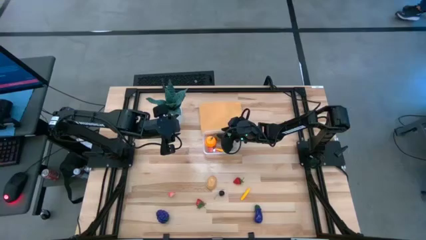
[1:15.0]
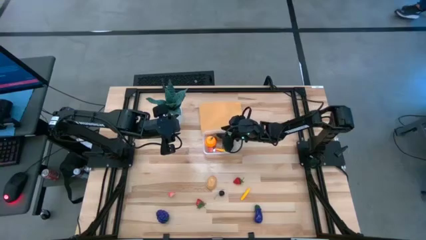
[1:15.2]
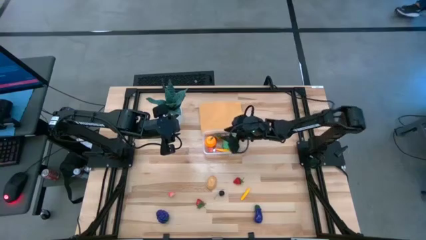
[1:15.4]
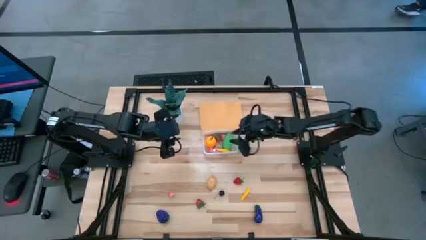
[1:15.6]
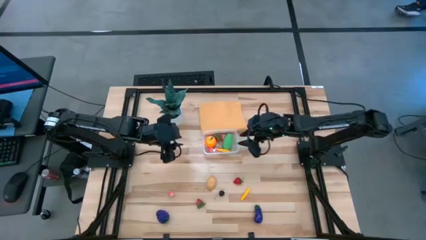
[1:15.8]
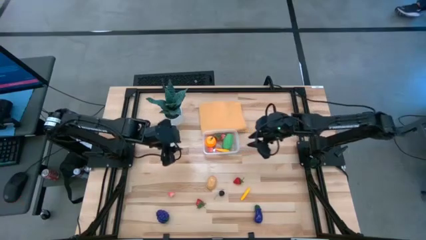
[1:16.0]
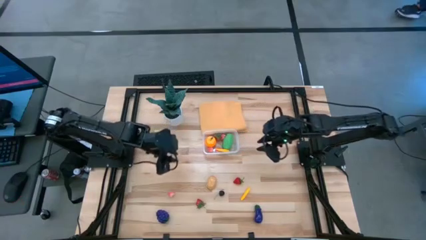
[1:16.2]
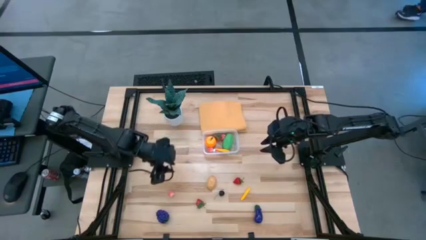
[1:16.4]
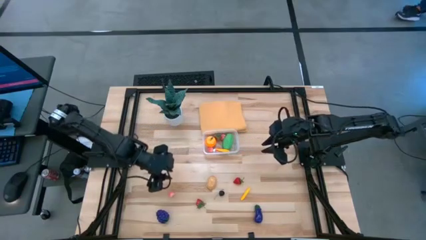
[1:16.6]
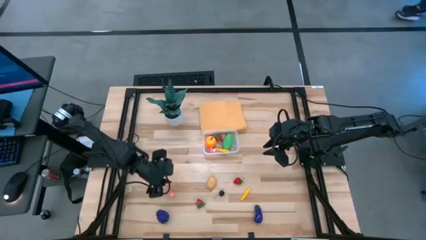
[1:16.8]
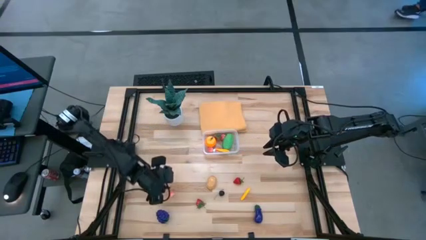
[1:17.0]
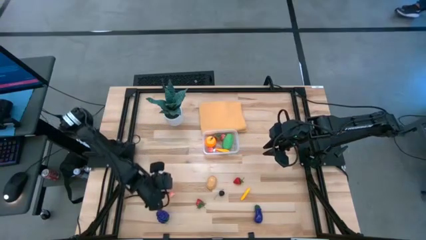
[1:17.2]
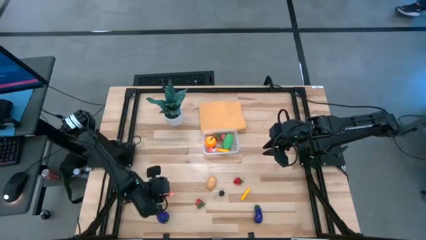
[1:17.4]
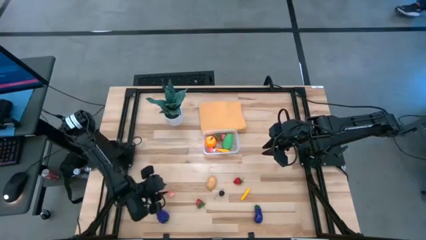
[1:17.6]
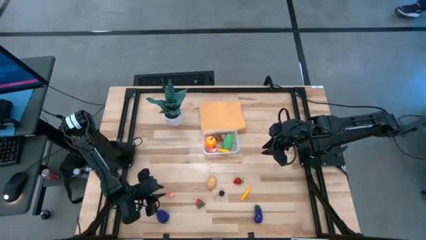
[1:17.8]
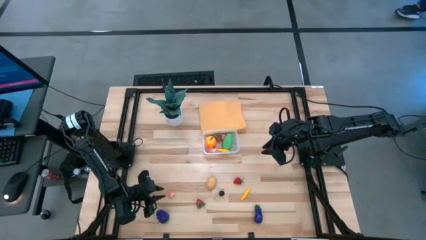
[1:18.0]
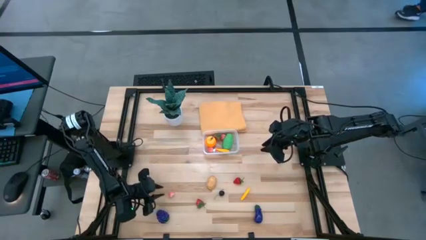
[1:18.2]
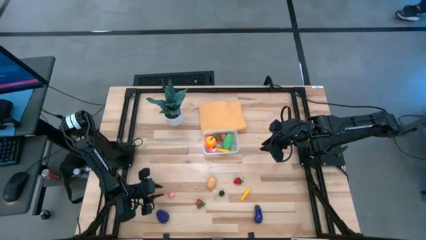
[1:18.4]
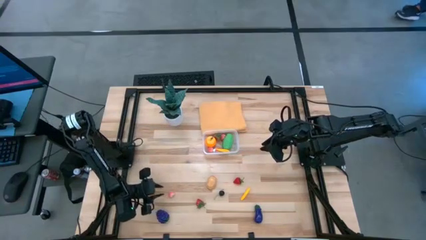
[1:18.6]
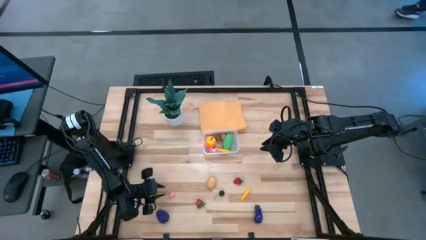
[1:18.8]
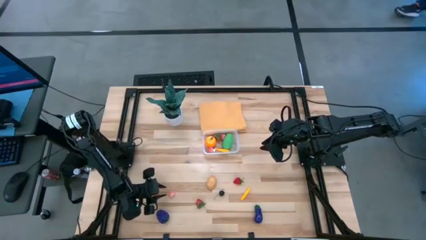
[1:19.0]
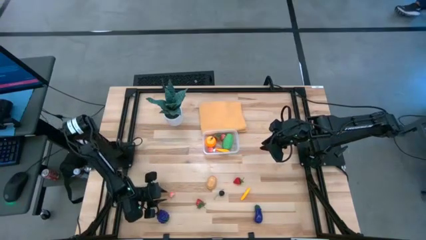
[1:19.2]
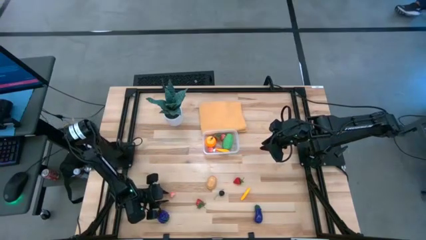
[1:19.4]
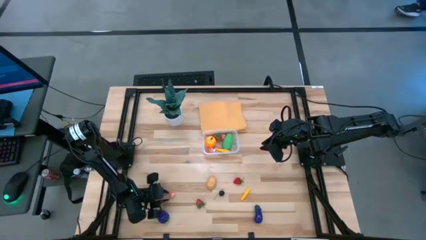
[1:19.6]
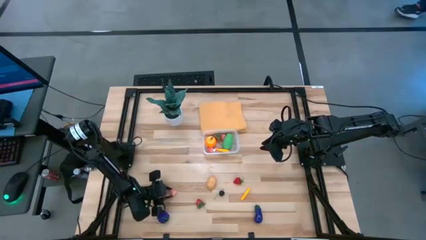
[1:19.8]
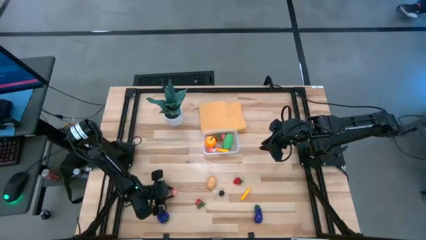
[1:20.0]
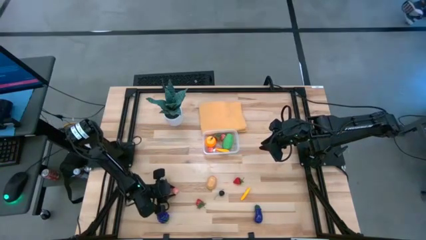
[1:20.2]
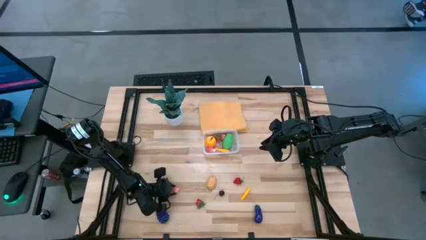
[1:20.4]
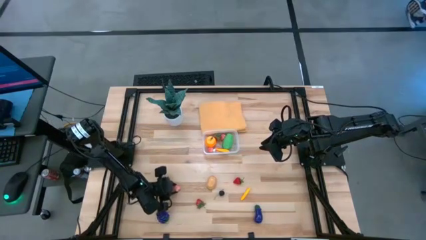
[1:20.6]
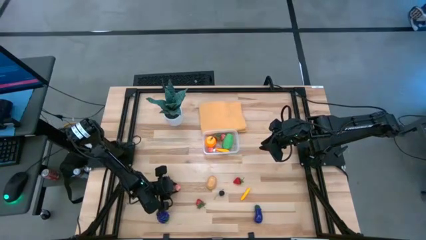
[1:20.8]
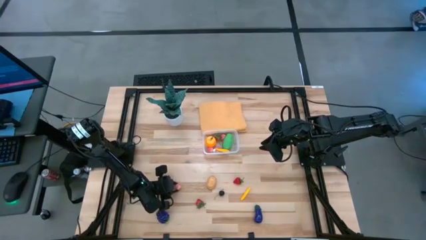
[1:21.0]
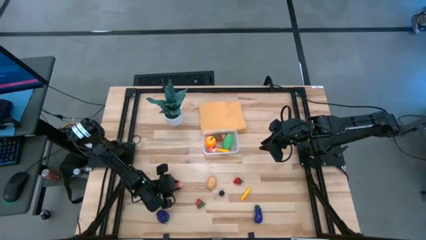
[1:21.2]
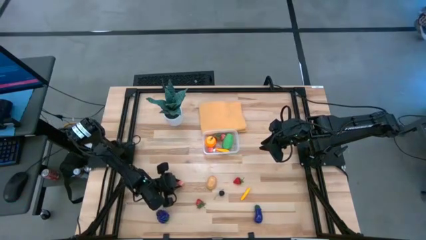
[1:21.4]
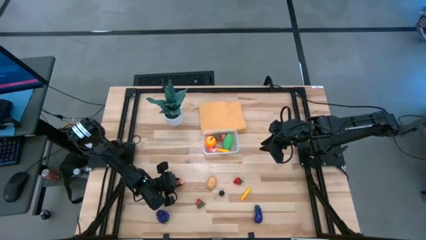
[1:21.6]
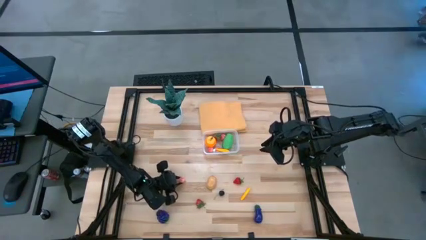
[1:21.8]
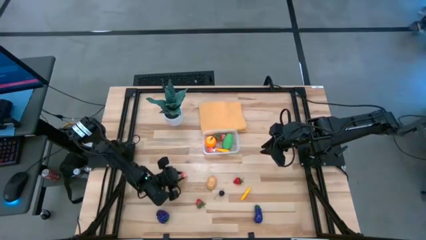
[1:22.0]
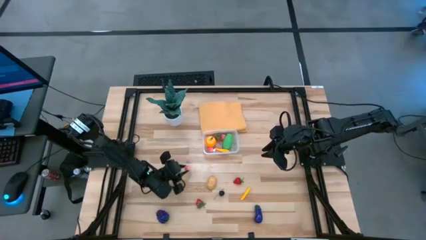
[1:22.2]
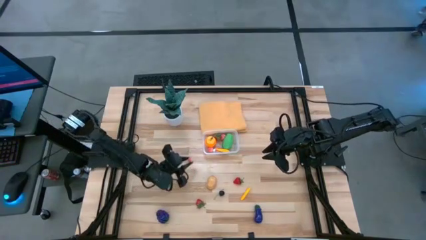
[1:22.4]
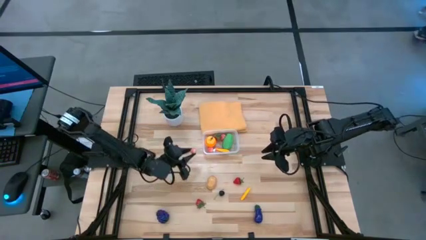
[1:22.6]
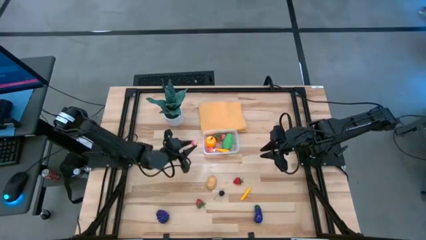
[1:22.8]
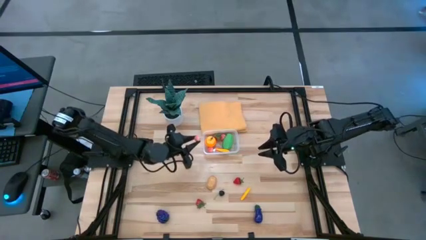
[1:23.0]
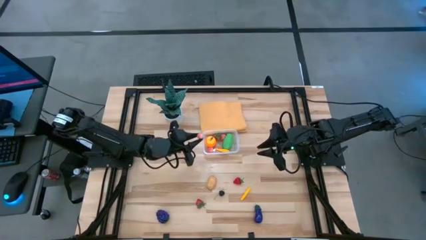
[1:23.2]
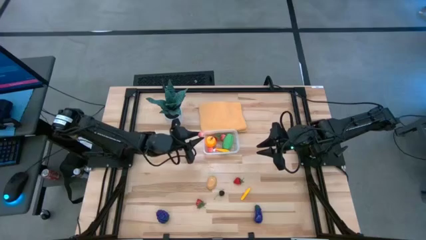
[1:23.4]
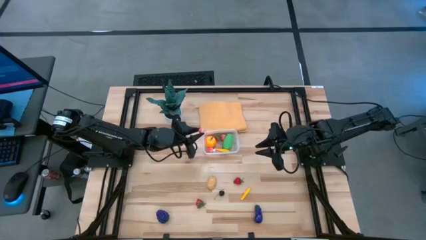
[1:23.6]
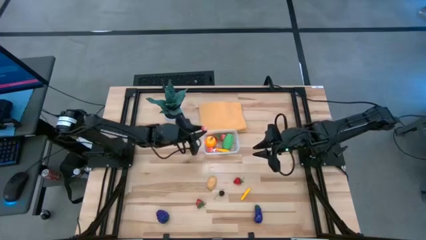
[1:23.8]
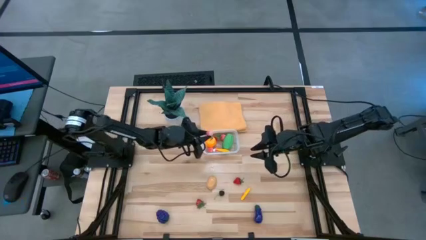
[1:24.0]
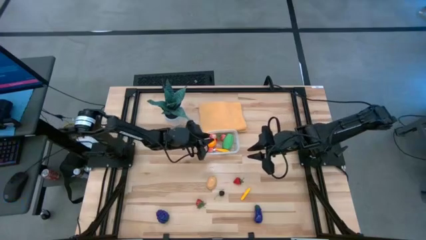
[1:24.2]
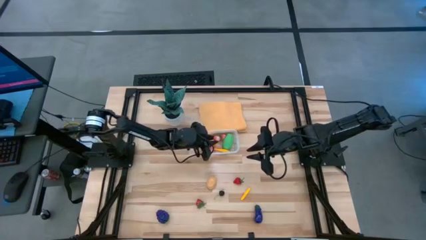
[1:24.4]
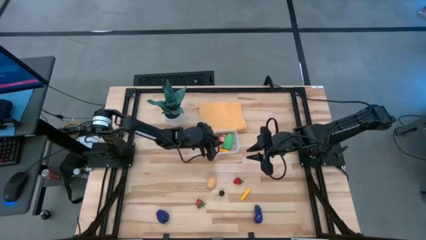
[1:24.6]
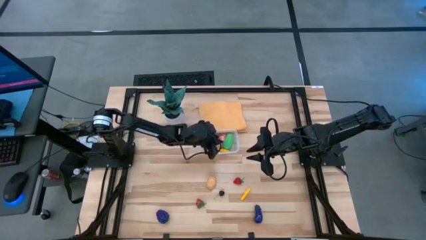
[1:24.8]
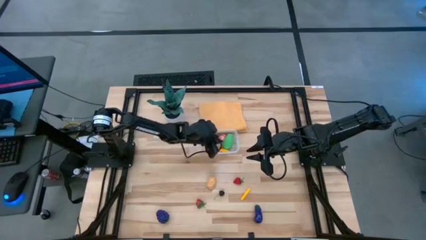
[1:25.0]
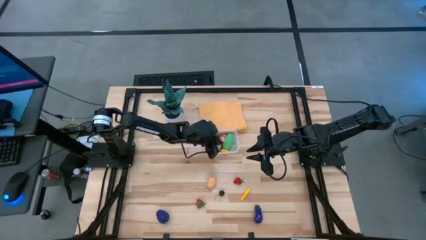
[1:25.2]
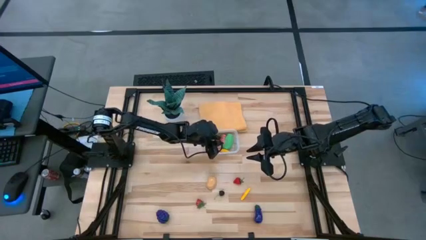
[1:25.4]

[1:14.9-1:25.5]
Task: Pick and placing Produce into tupperware
Put the pink apricot into the transparent bin

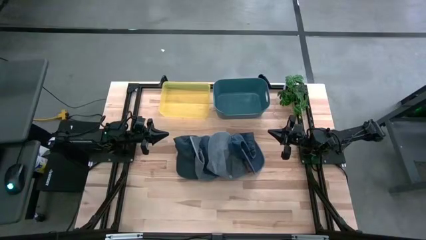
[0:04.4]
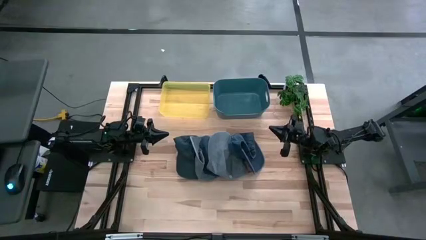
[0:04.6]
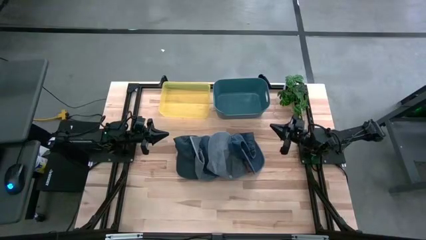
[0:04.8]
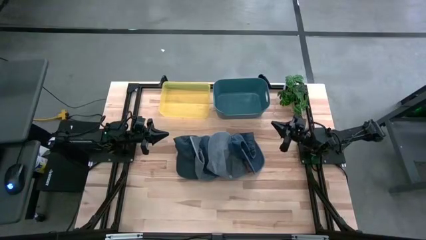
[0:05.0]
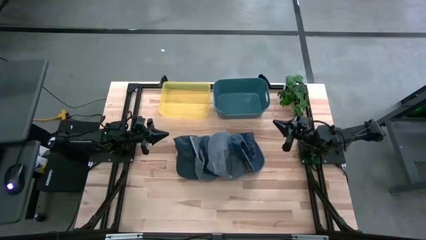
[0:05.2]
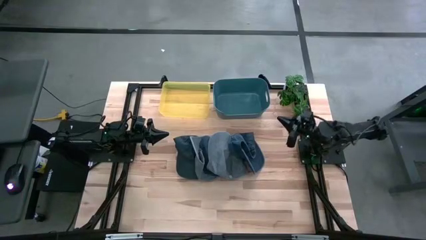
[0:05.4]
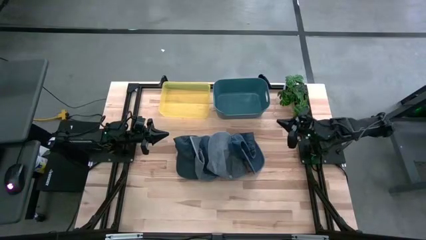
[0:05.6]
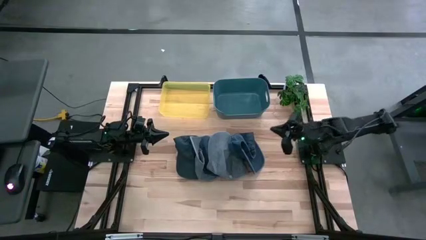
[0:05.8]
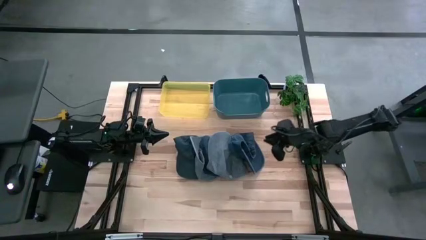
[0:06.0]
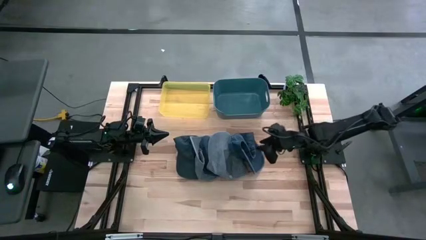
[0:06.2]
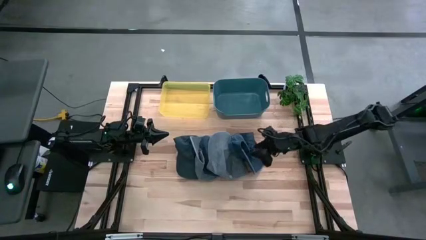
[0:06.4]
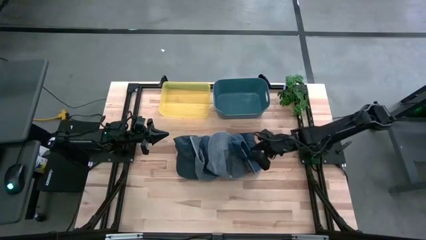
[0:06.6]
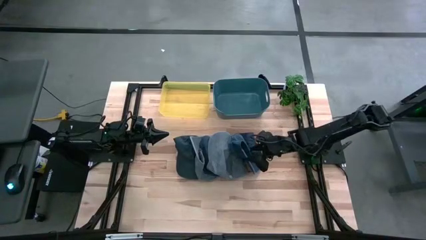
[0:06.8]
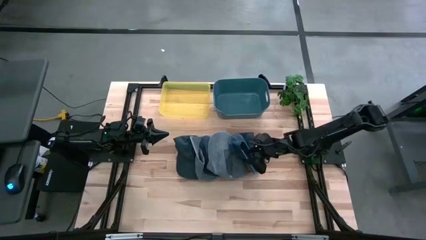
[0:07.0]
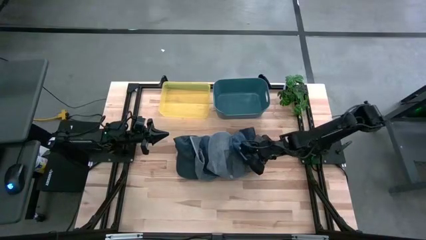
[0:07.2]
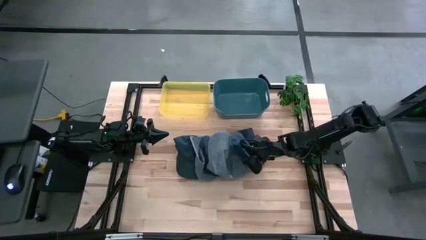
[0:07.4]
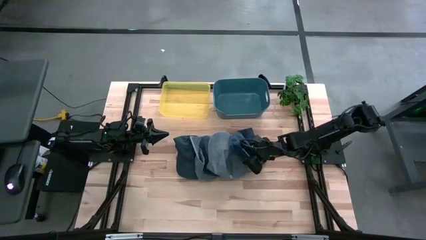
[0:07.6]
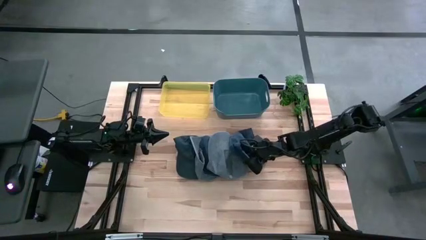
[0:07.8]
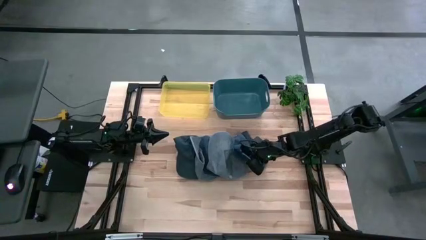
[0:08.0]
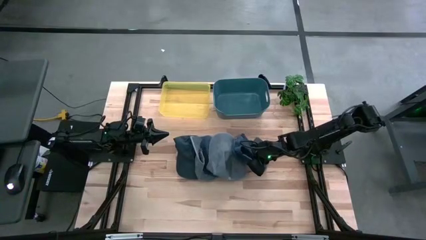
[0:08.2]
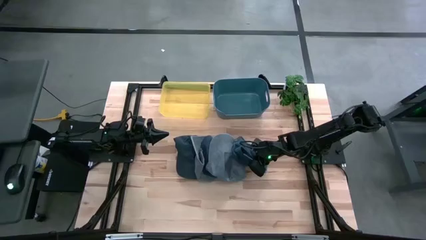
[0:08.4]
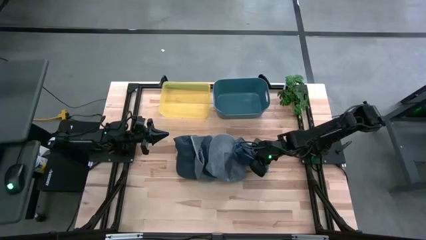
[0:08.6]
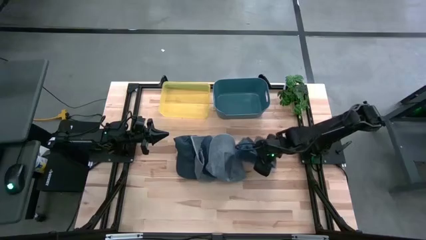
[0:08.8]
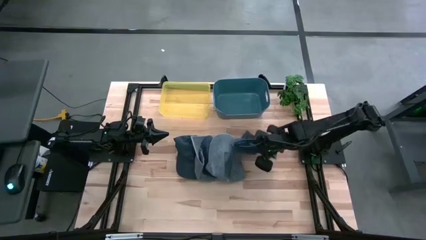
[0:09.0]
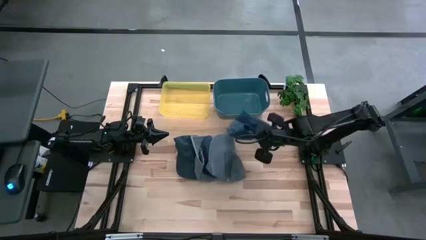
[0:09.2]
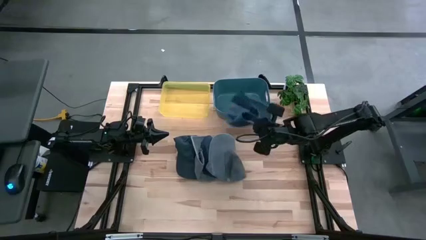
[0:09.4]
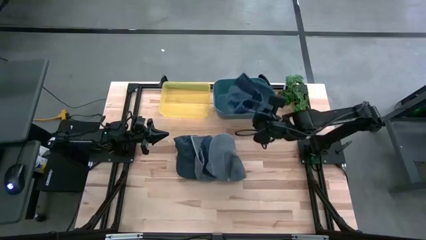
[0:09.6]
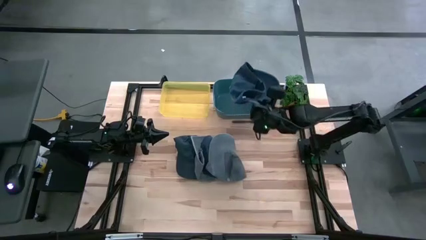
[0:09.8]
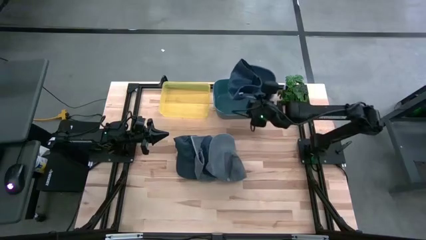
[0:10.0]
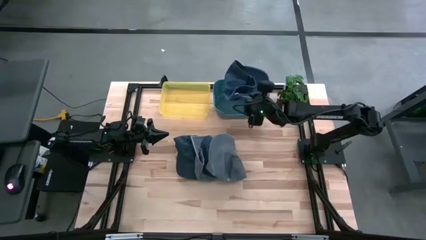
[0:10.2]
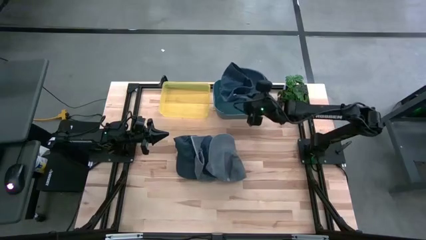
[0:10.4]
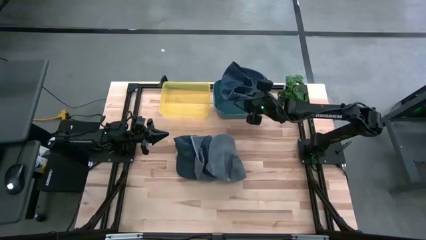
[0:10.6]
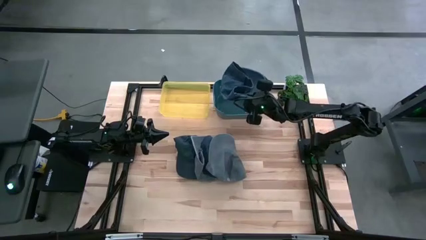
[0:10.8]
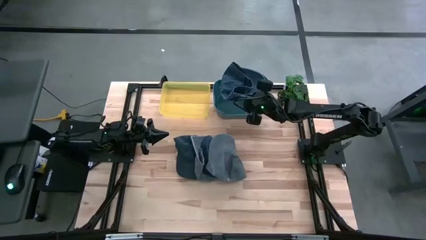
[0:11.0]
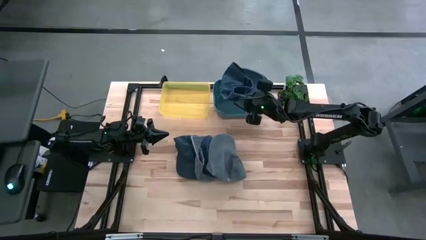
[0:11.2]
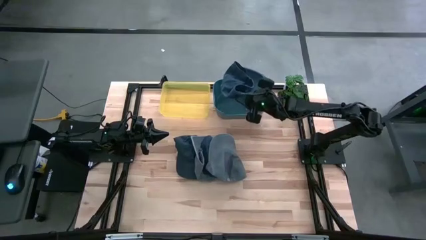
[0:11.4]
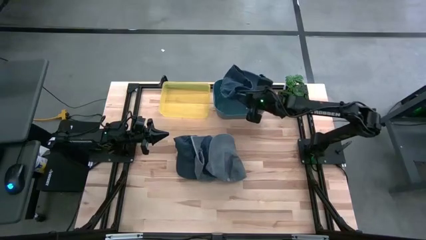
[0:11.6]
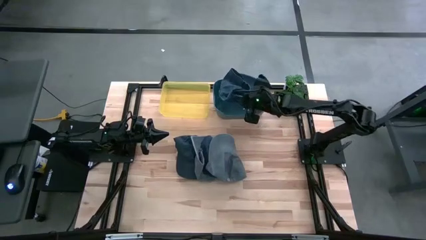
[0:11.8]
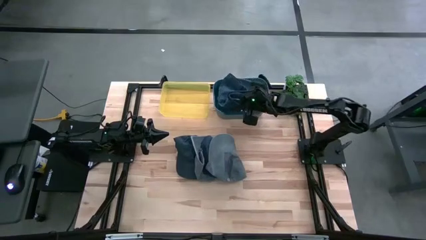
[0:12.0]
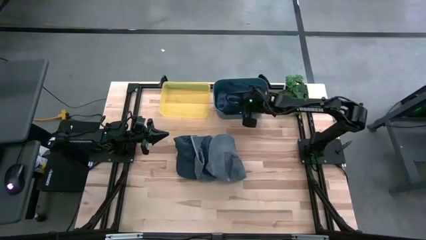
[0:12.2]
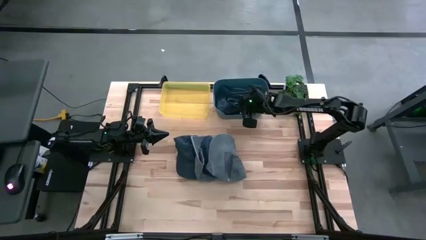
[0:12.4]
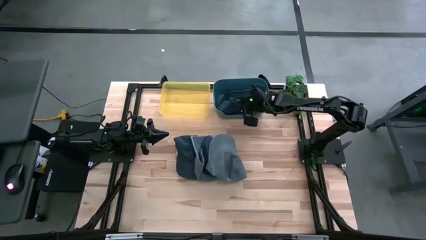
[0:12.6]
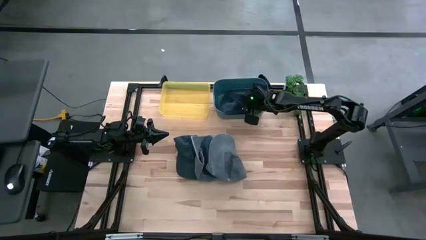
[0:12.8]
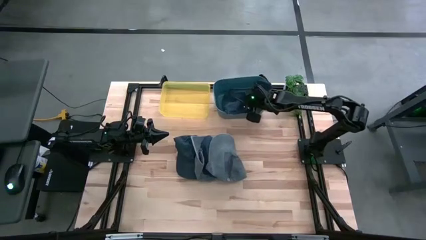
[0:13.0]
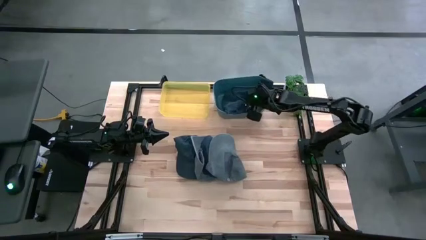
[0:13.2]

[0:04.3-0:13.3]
Task: Pick & Place hat
Put the right blue cap into the blue bin
